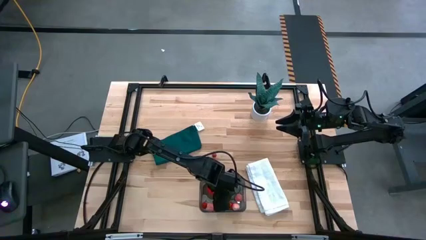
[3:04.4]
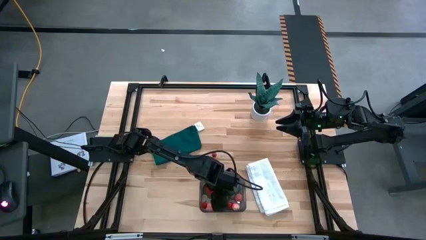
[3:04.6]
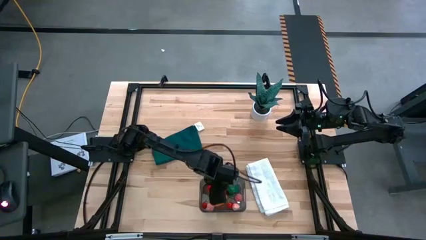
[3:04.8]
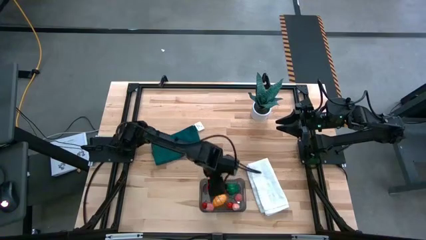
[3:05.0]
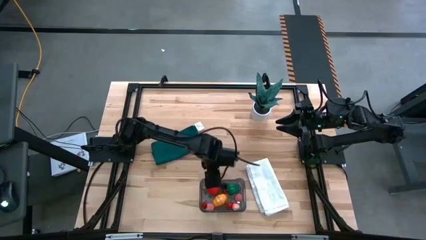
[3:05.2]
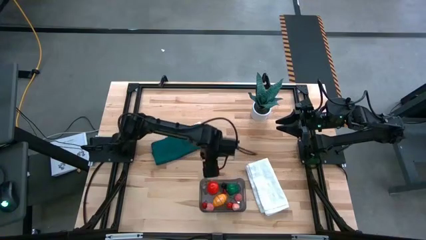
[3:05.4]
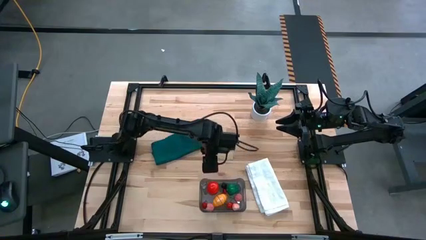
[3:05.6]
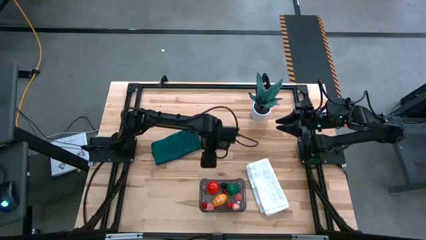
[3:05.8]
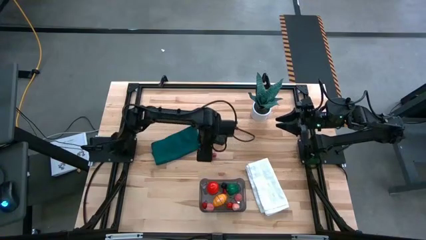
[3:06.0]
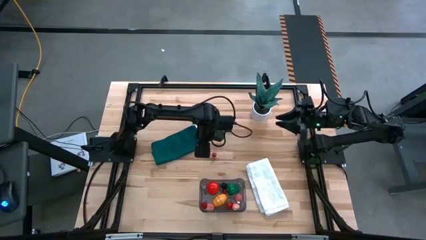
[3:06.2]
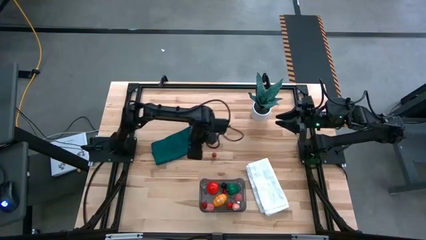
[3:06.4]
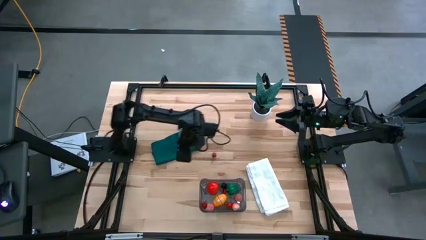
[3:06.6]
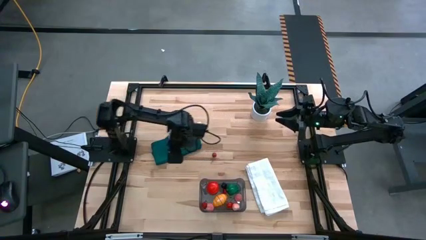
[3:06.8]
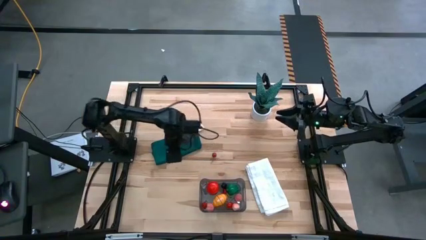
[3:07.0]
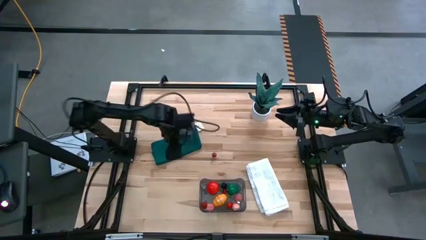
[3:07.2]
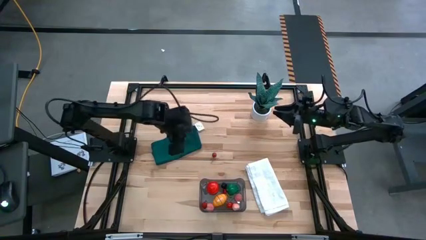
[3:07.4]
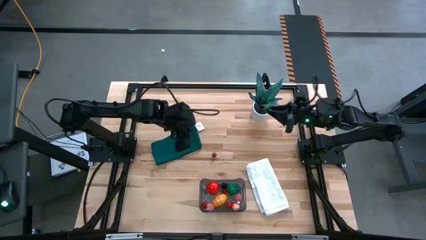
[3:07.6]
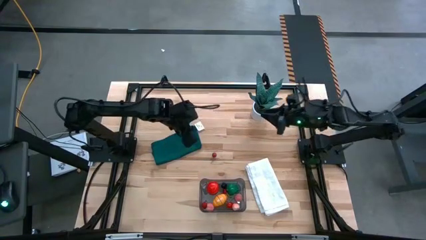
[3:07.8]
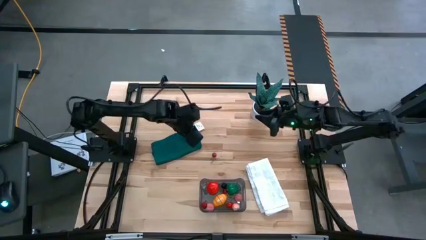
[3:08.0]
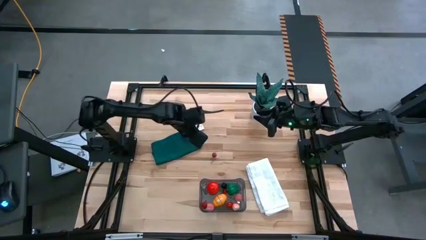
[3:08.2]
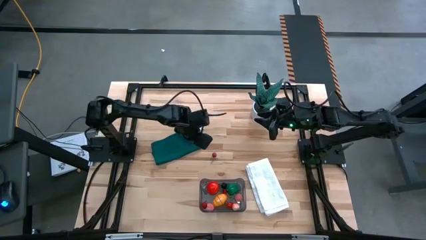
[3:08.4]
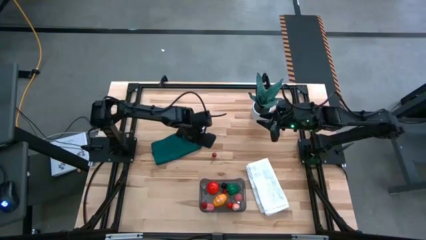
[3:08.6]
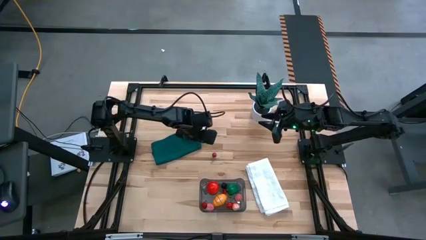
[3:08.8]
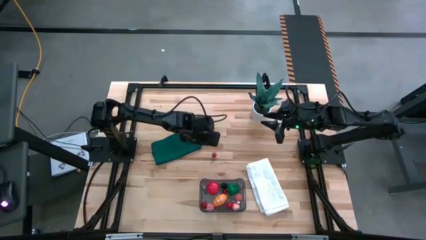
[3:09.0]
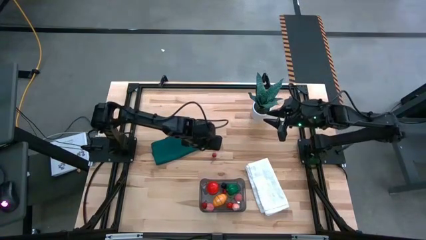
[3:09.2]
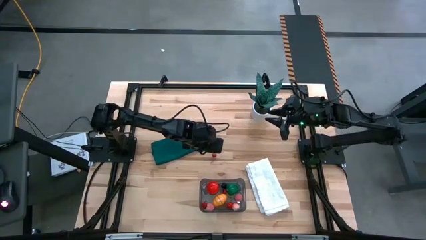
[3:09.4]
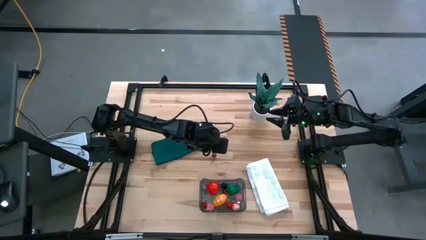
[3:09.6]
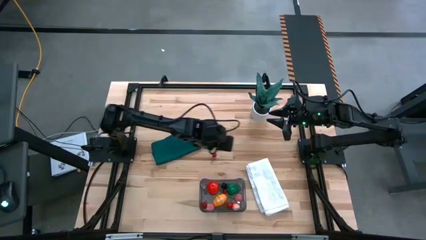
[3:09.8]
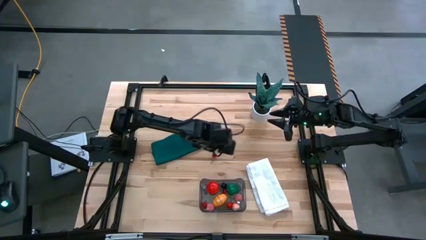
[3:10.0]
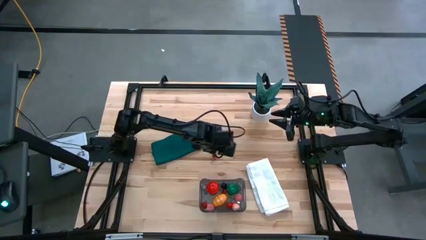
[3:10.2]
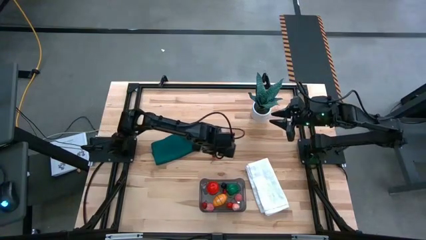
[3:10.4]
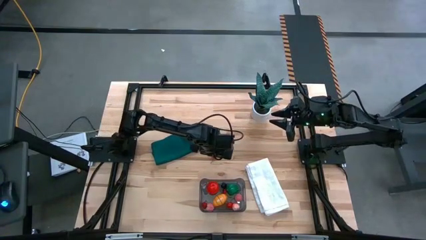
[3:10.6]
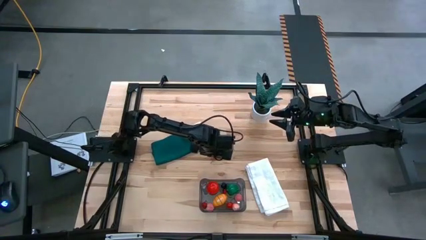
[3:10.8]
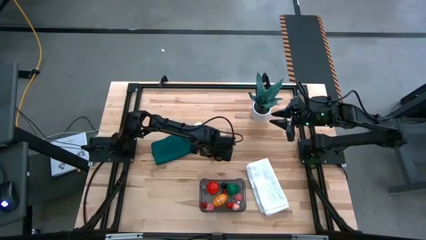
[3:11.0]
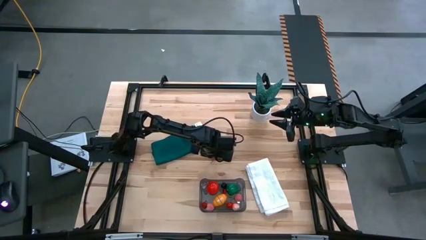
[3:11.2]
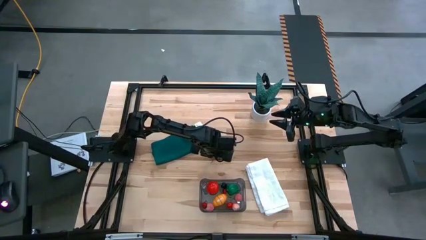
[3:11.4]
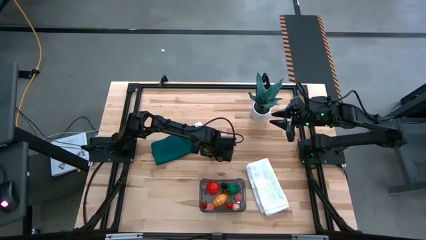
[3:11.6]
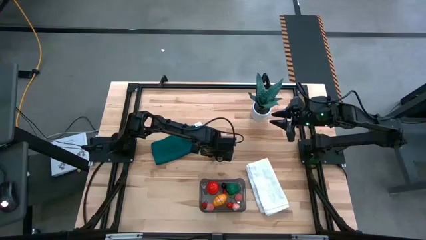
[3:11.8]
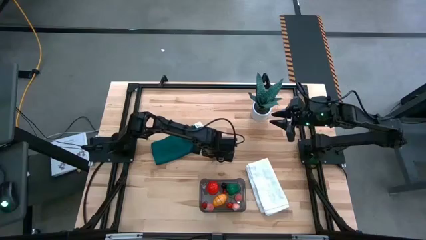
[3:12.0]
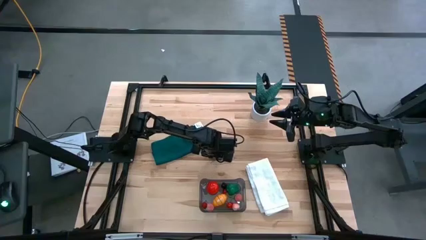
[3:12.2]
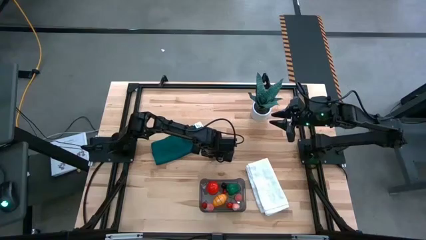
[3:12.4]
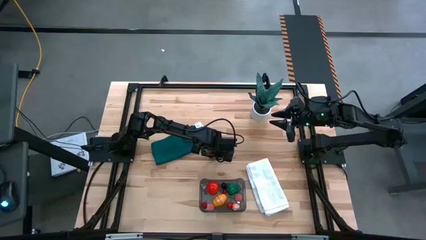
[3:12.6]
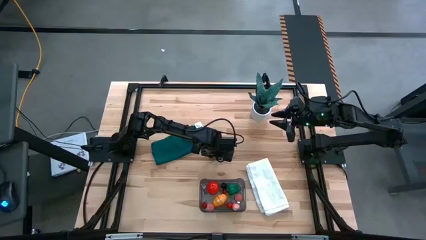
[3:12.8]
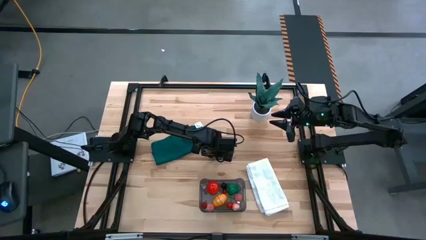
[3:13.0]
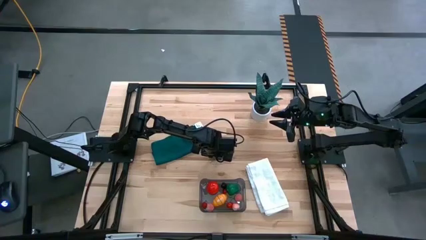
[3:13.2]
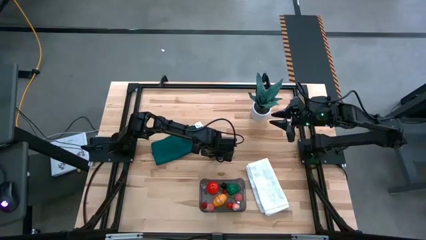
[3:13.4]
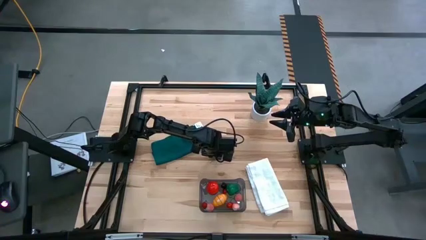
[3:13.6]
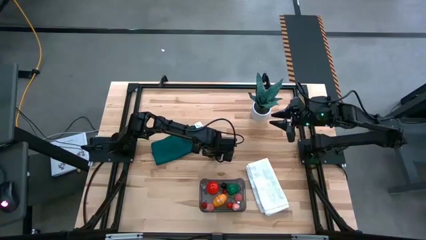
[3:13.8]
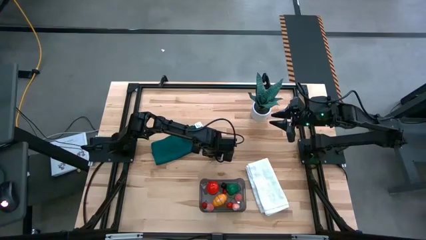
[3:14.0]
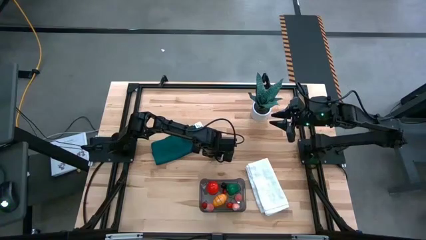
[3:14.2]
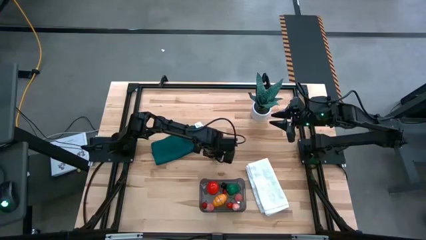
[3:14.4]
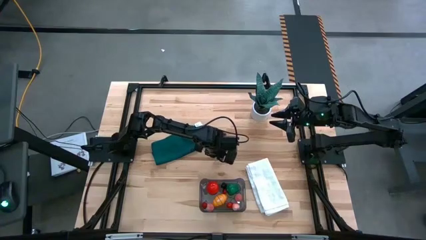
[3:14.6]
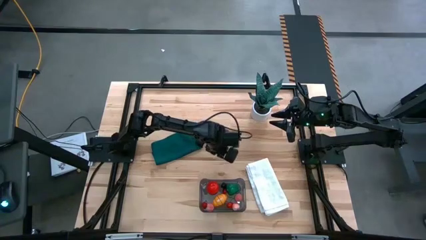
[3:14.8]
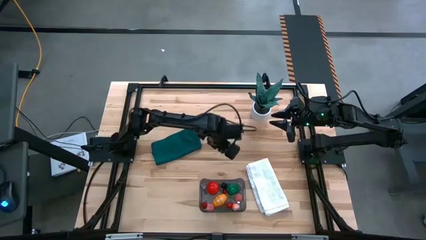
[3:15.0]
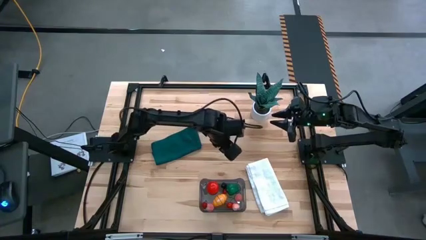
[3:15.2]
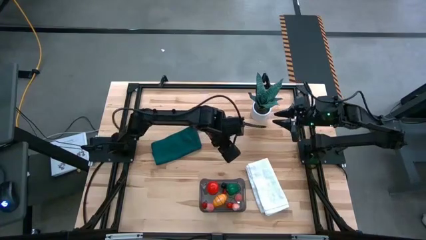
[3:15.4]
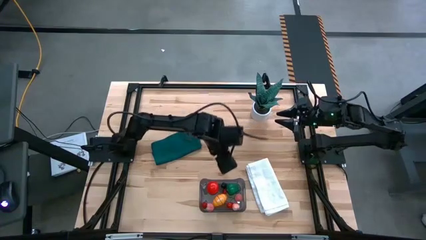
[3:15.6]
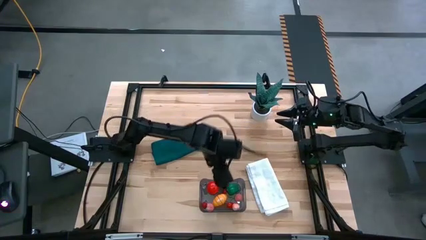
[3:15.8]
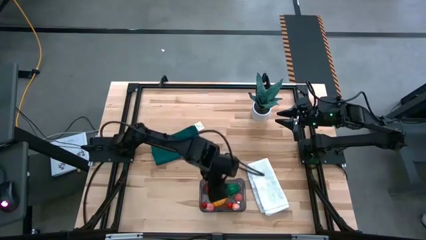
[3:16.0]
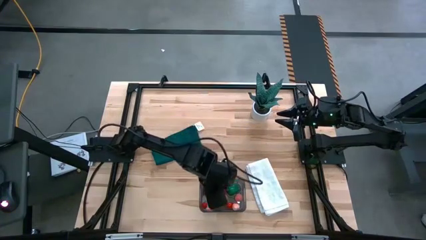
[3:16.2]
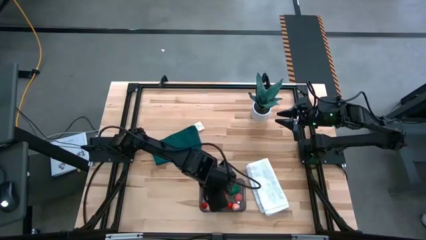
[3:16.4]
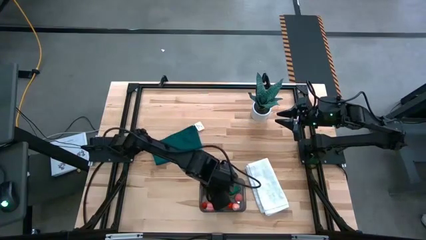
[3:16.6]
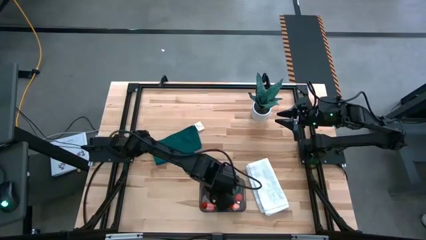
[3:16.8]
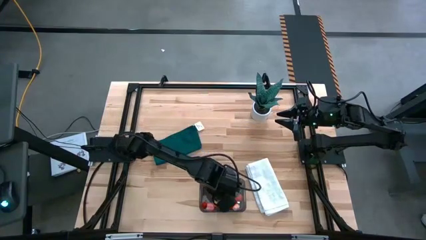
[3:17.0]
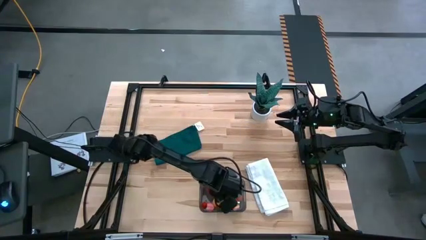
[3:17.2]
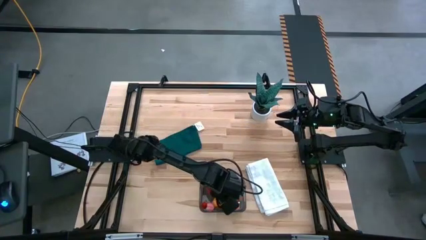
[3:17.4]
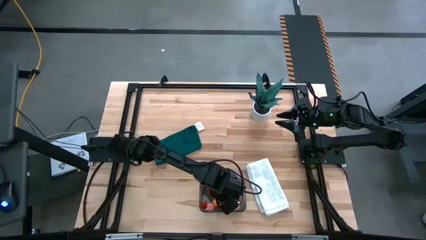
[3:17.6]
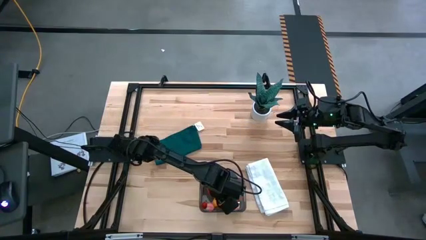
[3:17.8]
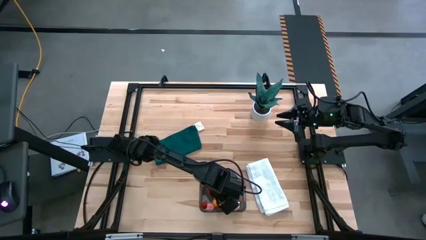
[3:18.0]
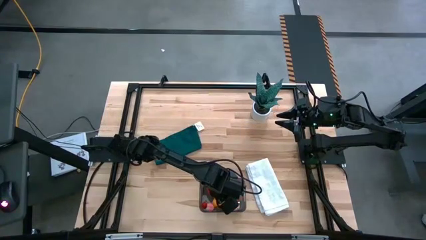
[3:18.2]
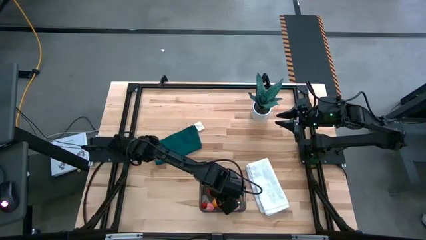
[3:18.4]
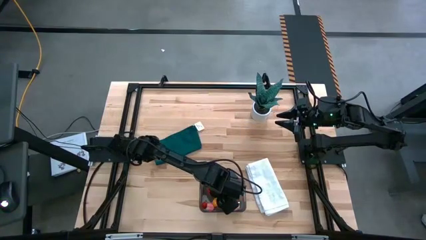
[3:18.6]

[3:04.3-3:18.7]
Task: Pick and placing Produce into tupperware
Put the red cherry into the black bin
